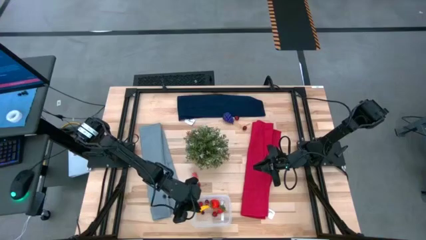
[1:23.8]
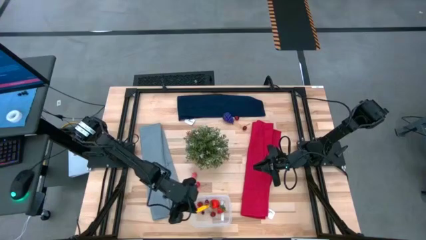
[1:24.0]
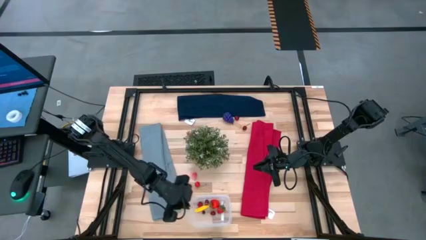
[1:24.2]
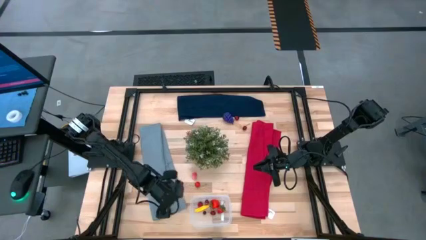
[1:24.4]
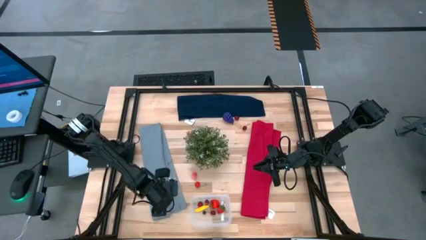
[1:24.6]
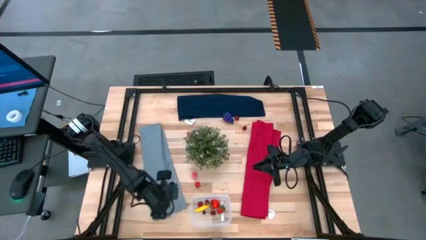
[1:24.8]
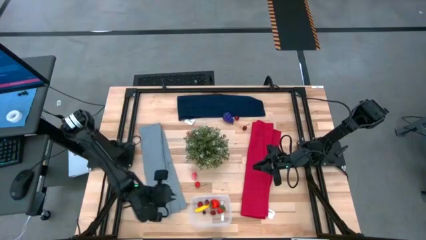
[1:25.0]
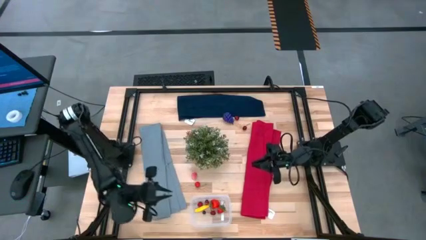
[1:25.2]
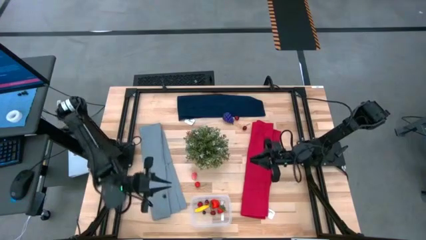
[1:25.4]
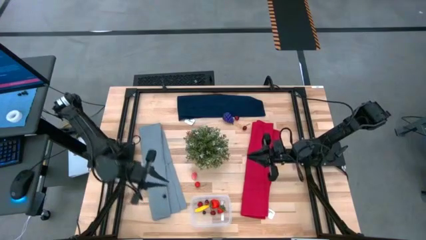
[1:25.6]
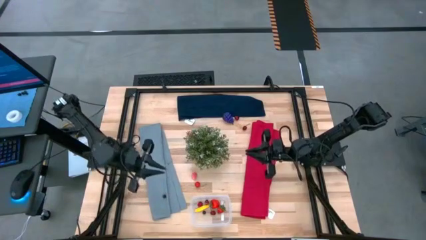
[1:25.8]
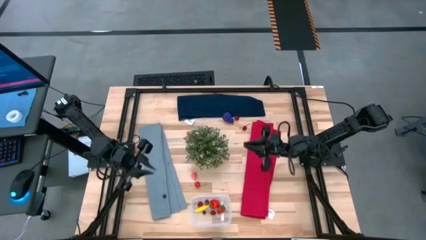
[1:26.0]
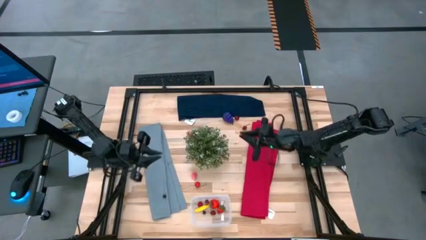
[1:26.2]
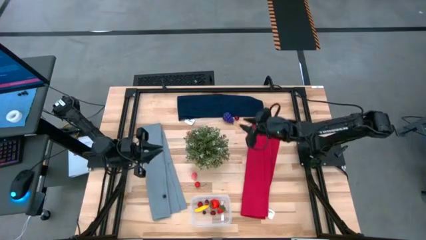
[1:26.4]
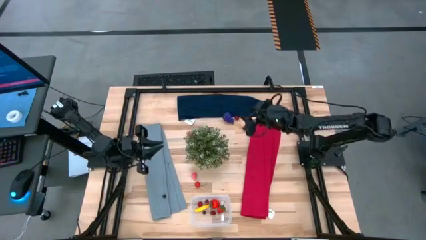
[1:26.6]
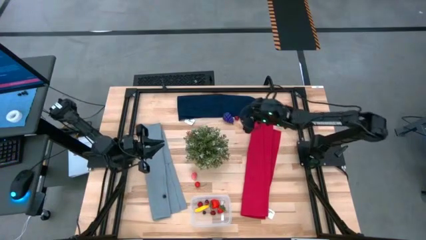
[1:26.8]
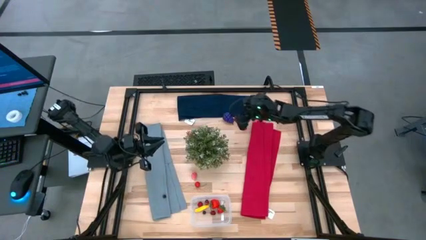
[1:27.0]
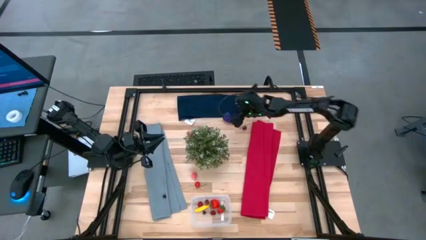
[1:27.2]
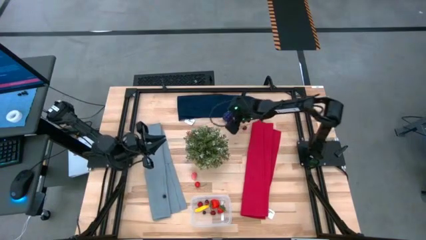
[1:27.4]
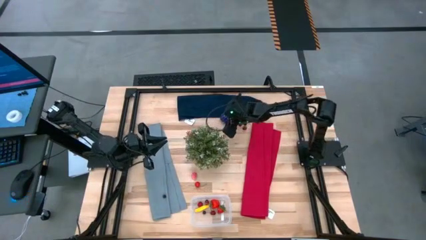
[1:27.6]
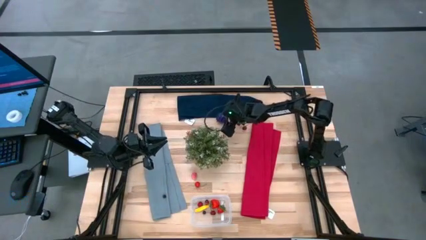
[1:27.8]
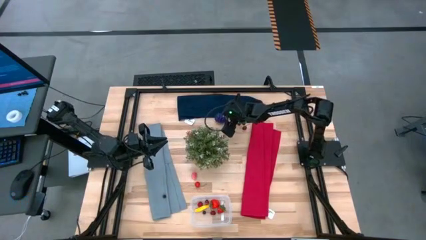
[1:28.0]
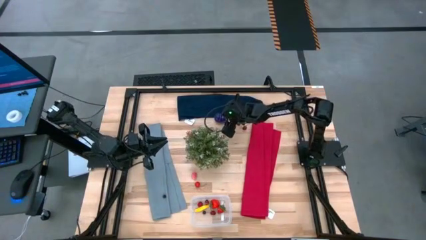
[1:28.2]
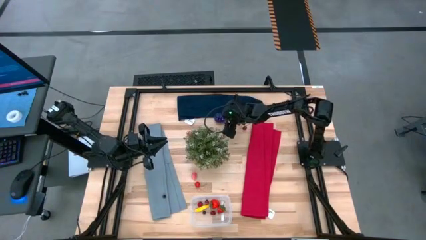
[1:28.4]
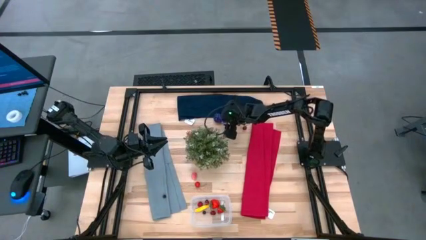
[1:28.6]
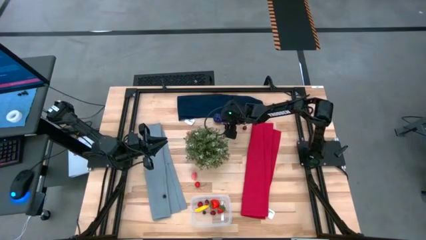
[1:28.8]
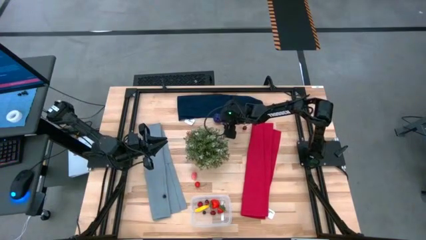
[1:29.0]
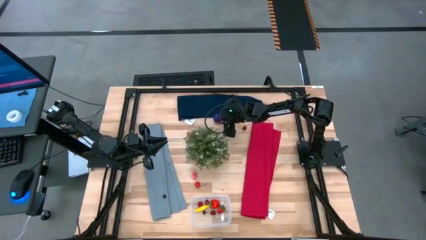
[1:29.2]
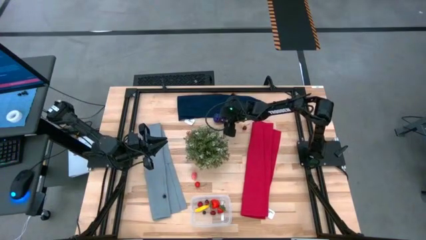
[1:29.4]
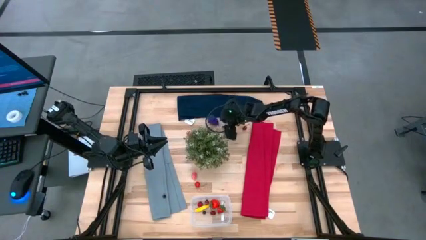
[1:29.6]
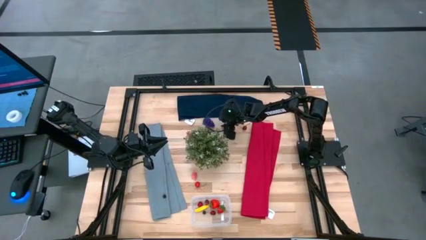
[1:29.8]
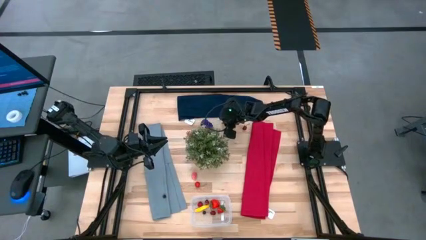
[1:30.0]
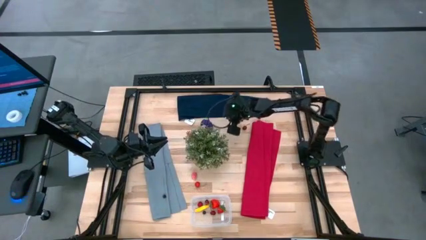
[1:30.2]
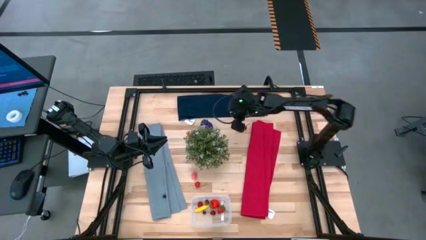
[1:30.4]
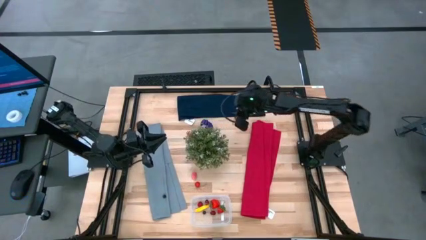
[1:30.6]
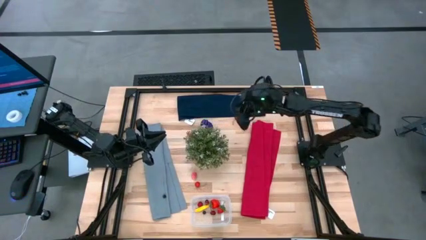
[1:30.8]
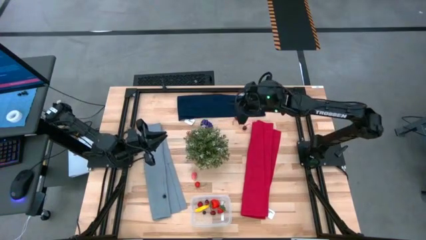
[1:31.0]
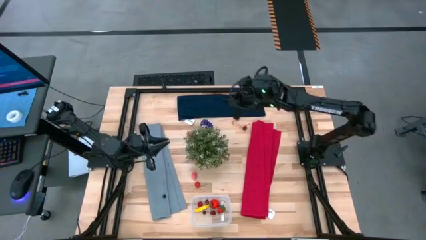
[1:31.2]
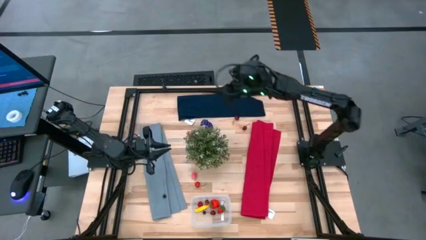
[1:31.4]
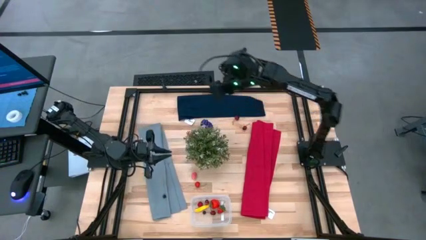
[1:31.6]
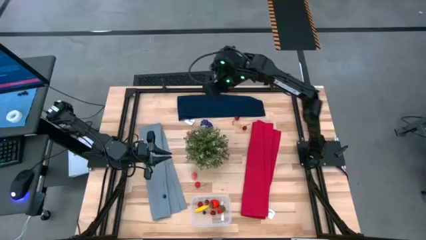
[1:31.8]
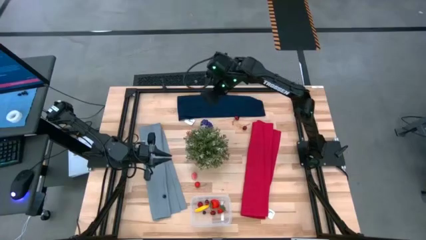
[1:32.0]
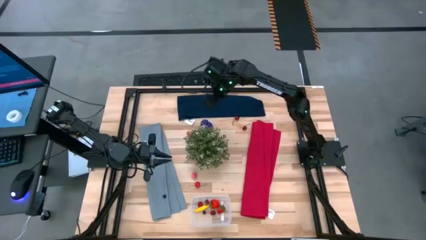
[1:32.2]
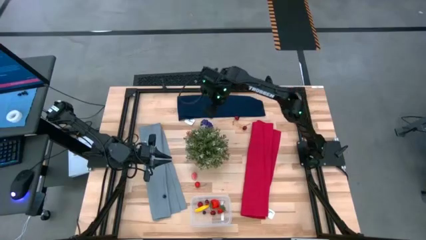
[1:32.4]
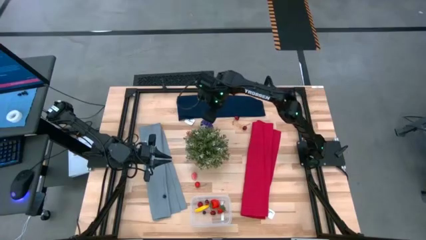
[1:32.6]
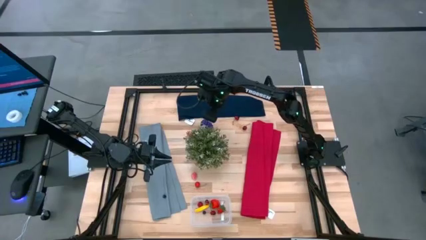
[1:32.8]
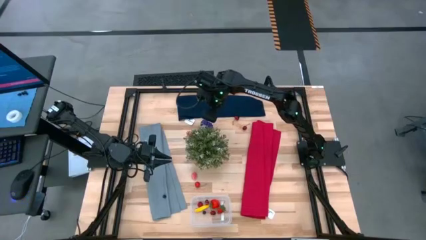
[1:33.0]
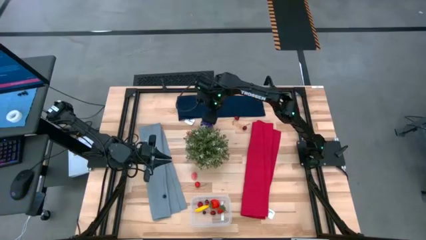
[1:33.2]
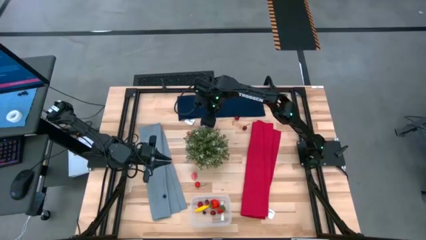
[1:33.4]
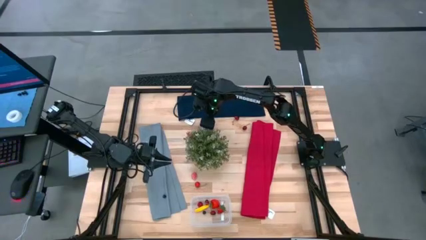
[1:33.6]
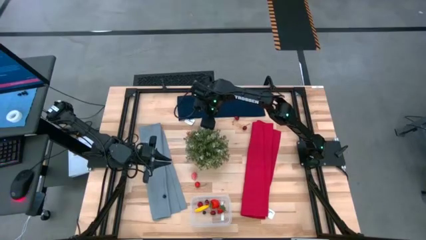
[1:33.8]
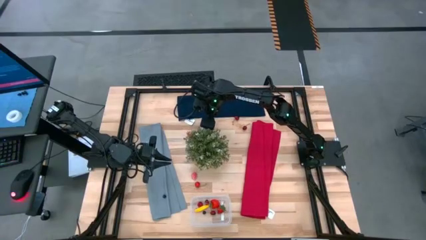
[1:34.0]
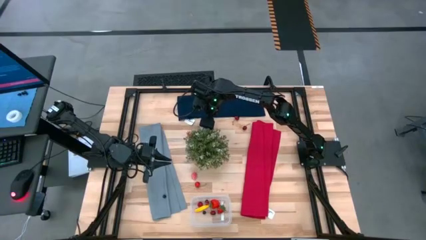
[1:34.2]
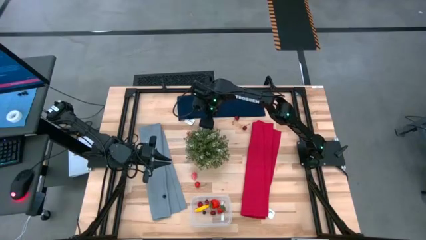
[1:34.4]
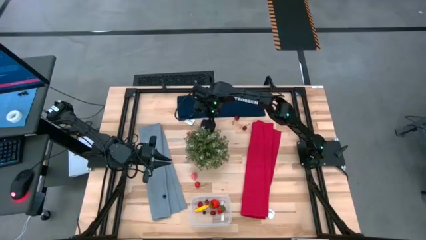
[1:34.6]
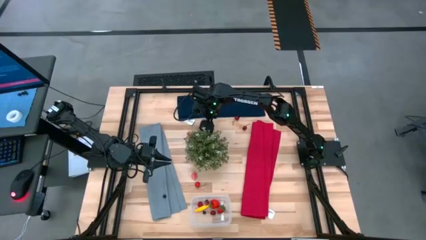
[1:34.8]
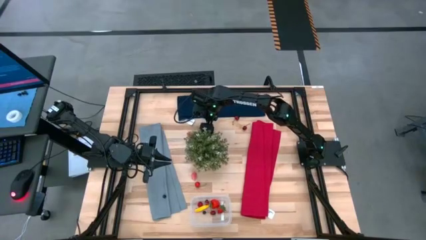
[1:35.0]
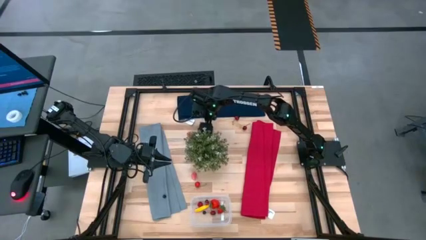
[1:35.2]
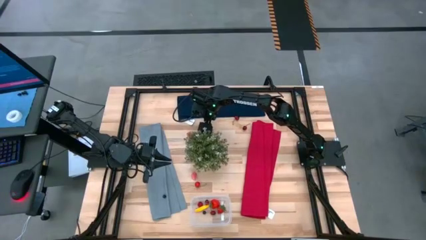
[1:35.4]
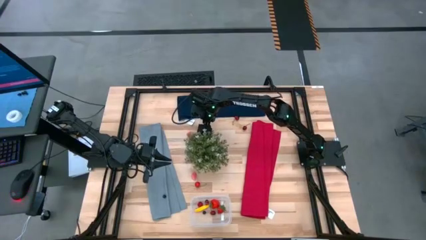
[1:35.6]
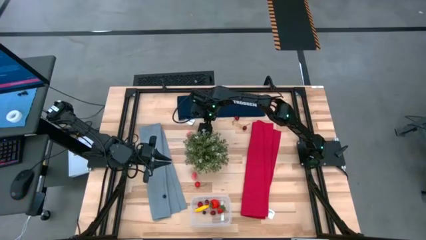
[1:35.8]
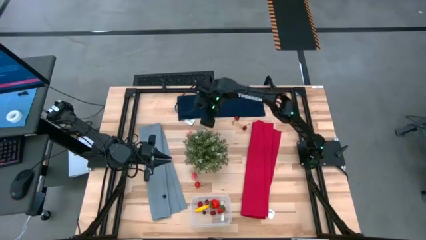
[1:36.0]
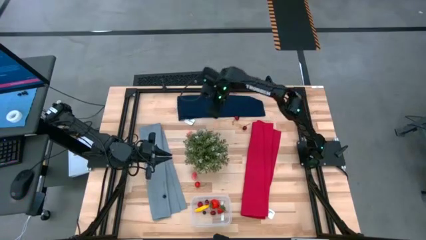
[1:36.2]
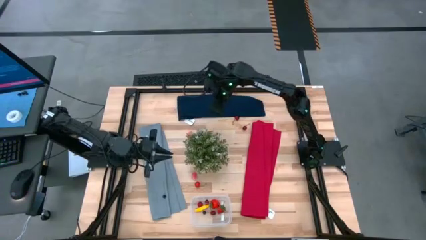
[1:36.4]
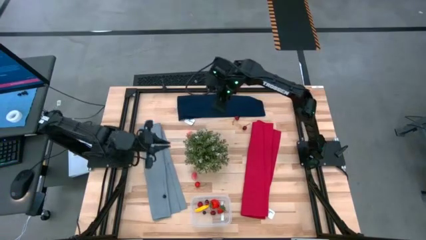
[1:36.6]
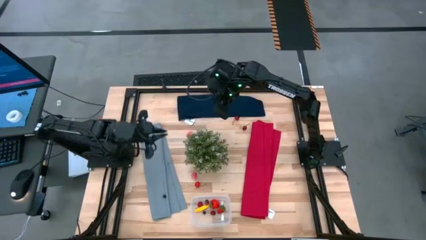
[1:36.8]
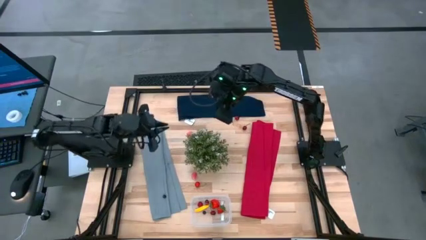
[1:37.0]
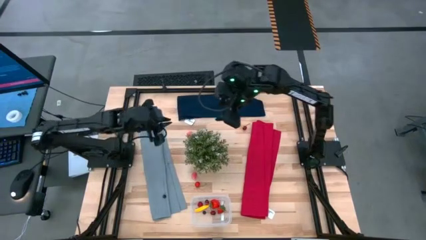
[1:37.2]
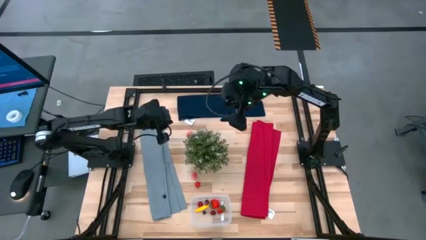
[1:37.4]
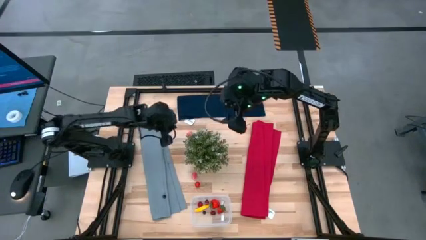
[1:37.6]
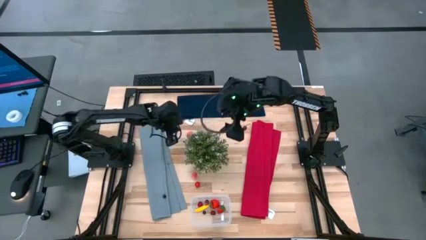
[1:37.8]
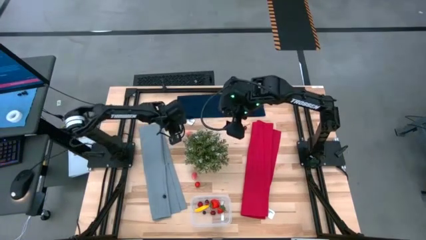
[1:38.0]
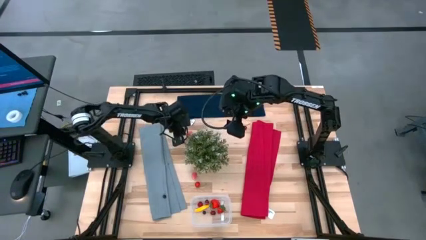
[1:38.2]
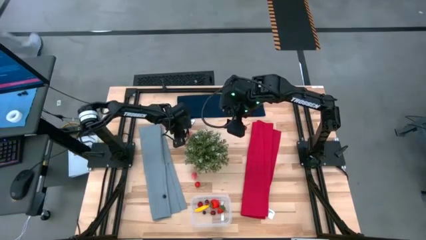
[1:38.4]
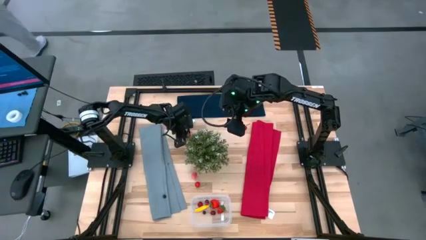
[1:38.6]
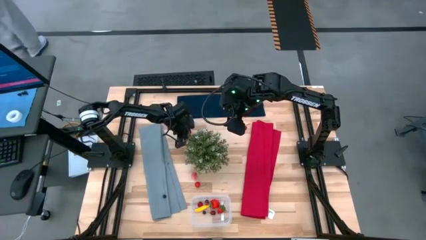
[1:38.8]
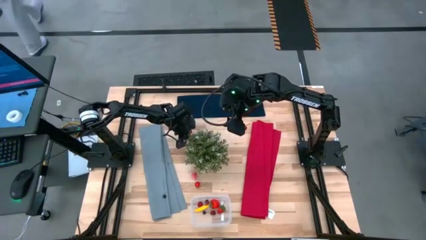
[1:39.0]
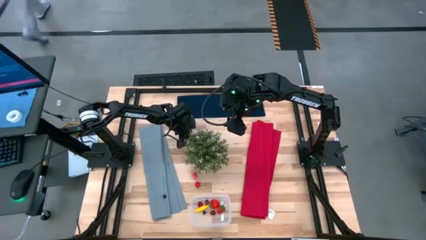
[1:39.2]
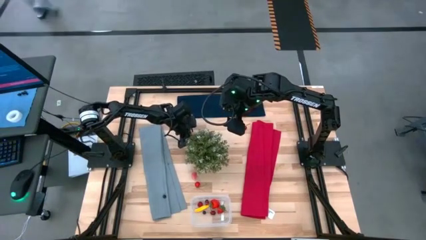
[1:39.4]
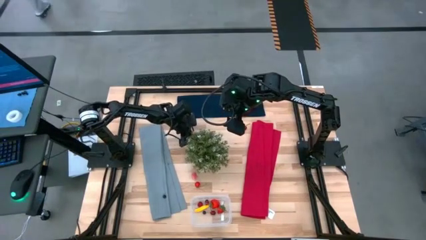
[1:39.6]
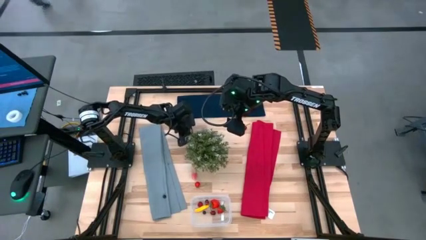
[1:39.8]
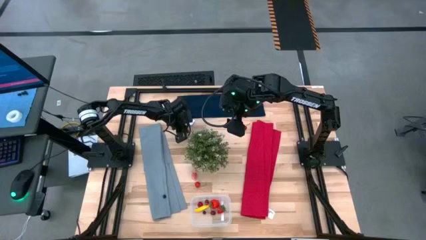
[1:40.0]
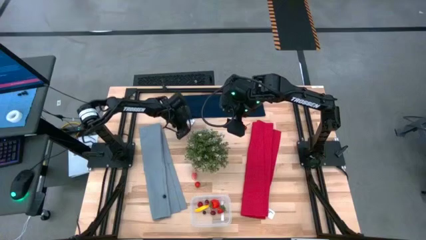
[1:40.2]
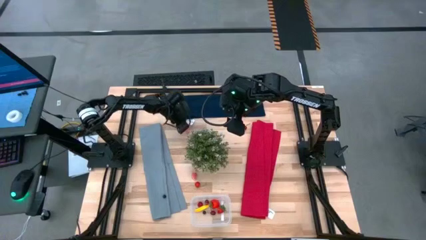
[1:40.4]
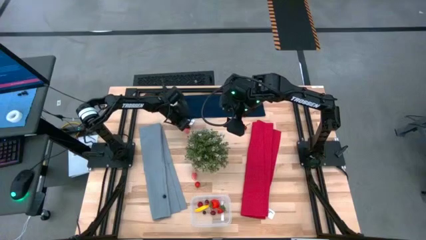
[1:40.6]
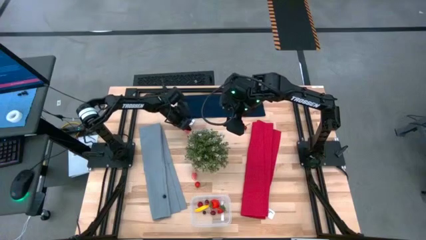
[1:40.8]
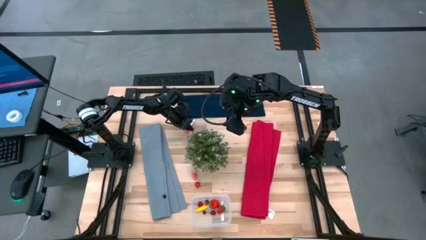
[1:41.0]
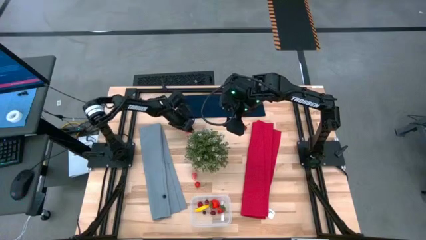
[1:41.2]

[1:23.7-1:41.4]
Task: Pick and placing Produce into tupperware
Put the grapes into the transparent container
